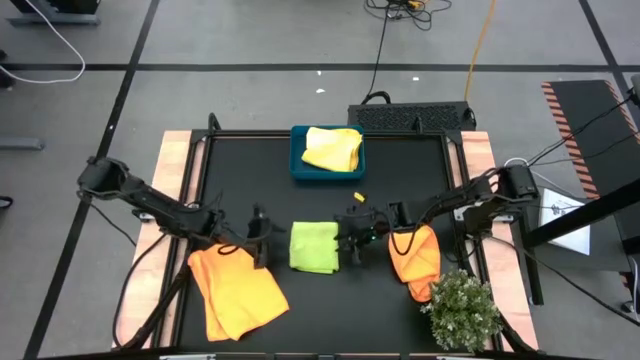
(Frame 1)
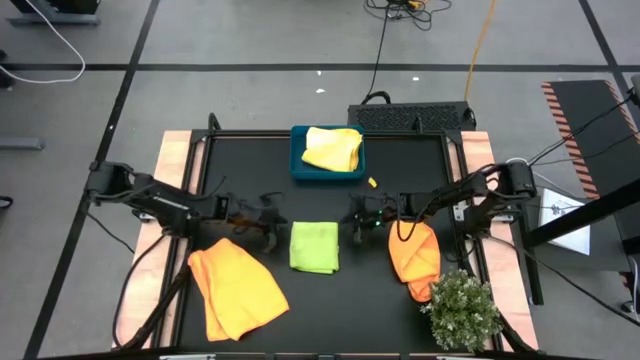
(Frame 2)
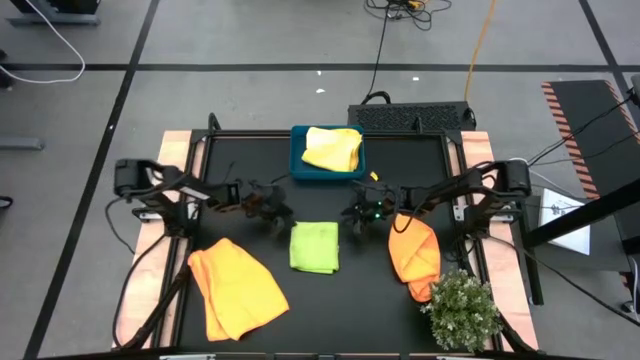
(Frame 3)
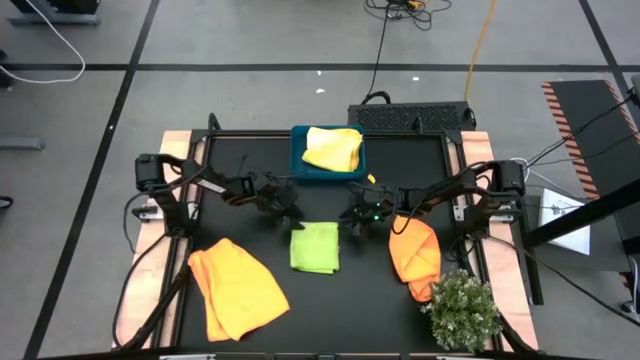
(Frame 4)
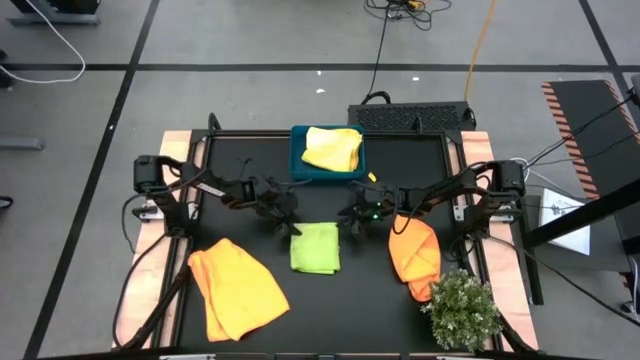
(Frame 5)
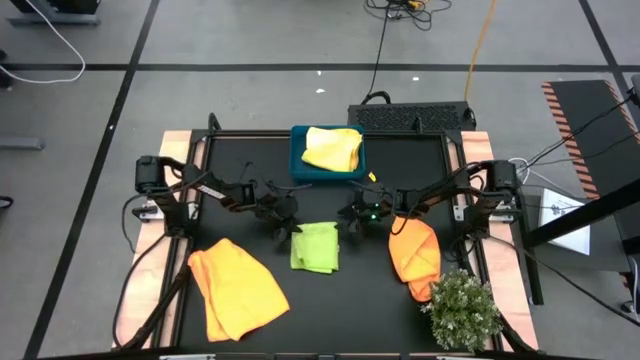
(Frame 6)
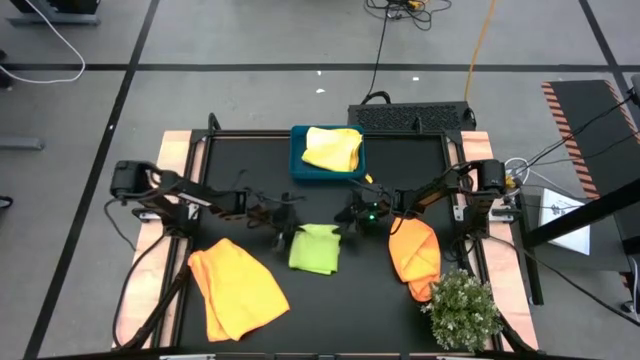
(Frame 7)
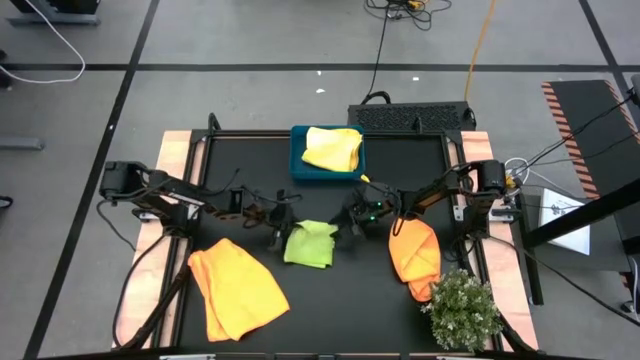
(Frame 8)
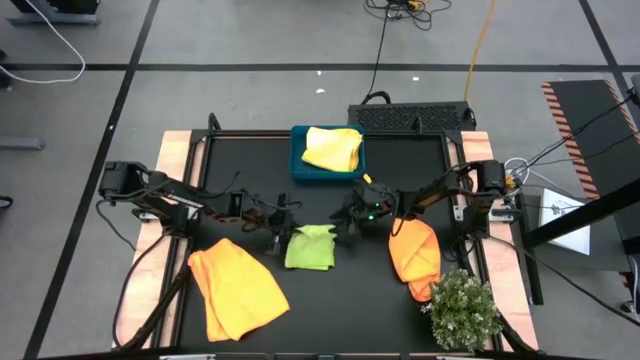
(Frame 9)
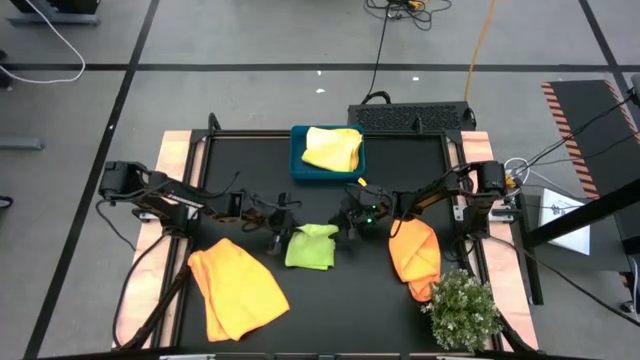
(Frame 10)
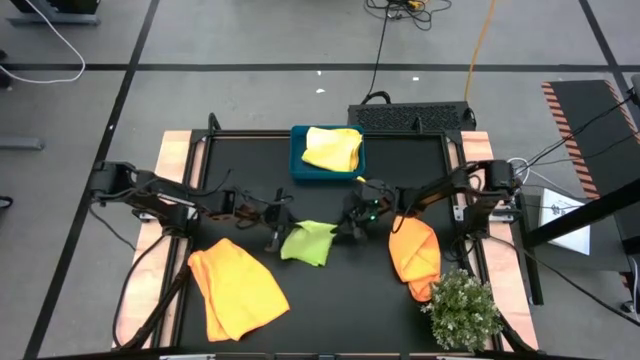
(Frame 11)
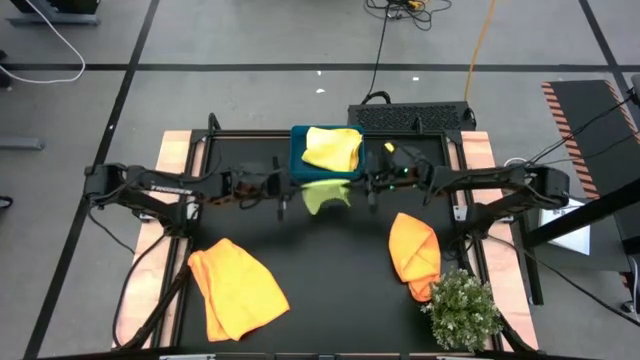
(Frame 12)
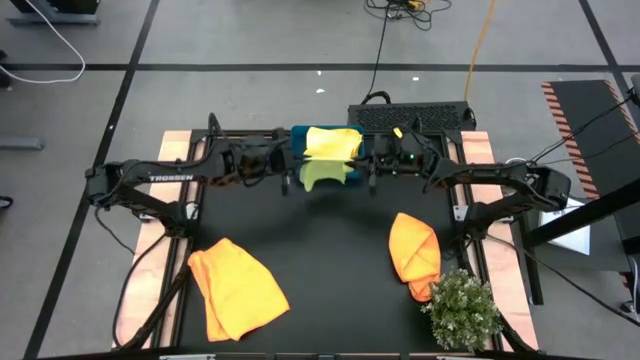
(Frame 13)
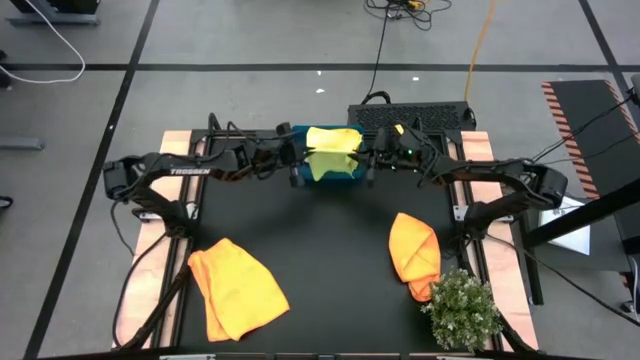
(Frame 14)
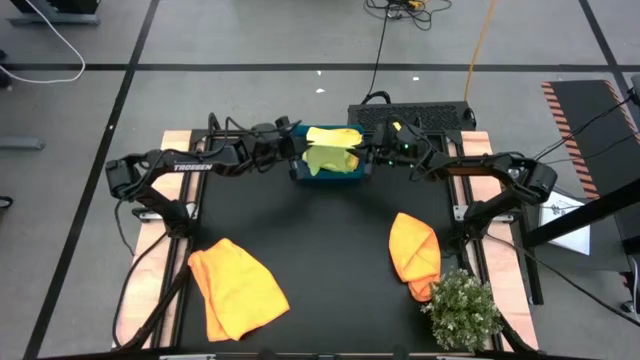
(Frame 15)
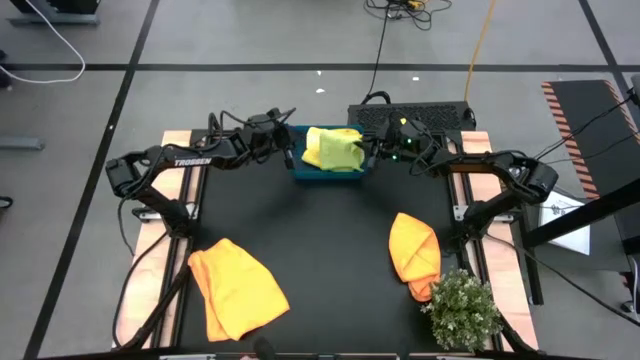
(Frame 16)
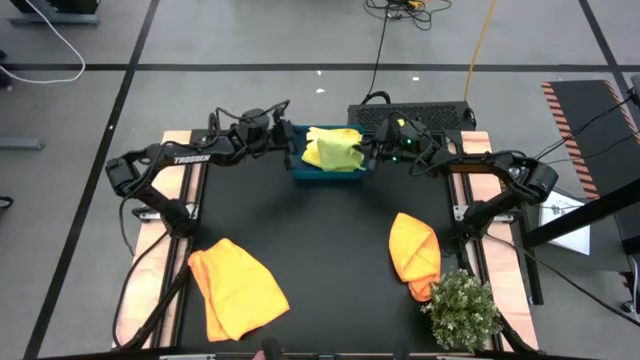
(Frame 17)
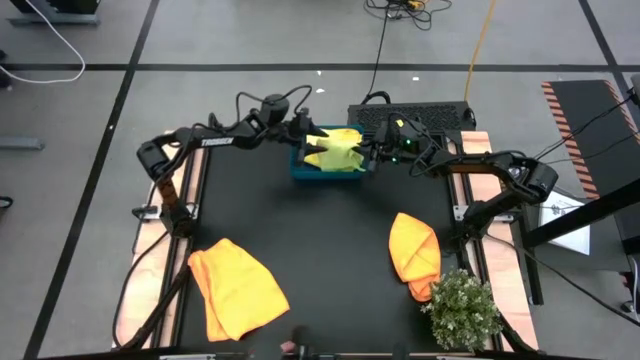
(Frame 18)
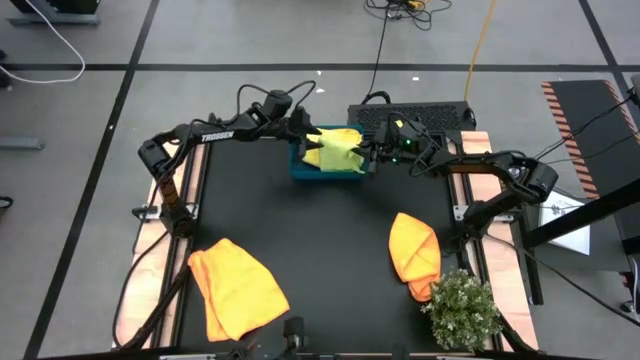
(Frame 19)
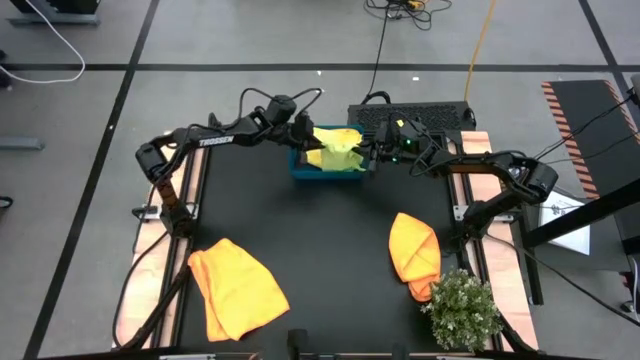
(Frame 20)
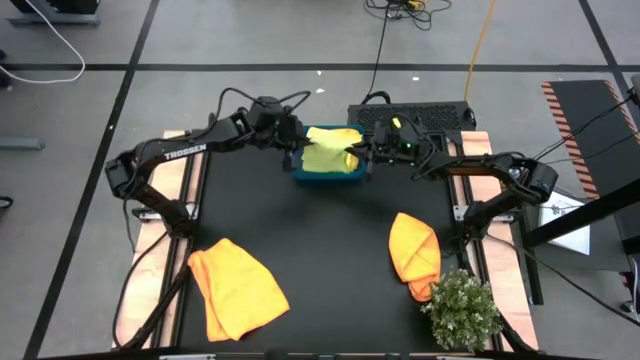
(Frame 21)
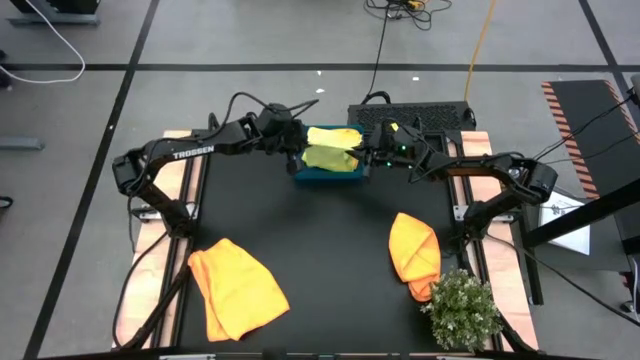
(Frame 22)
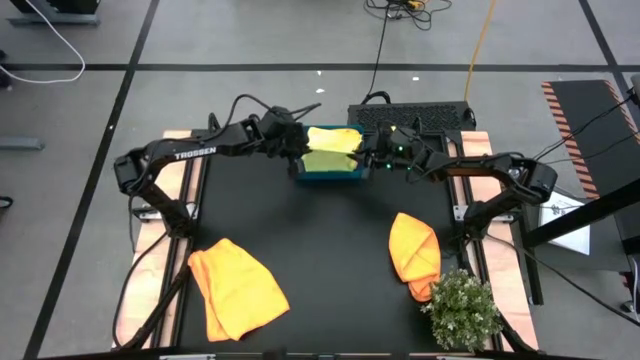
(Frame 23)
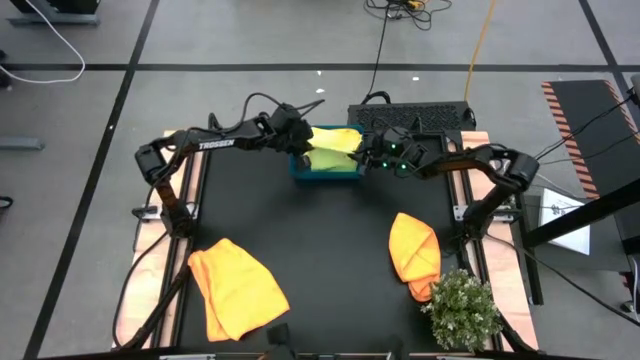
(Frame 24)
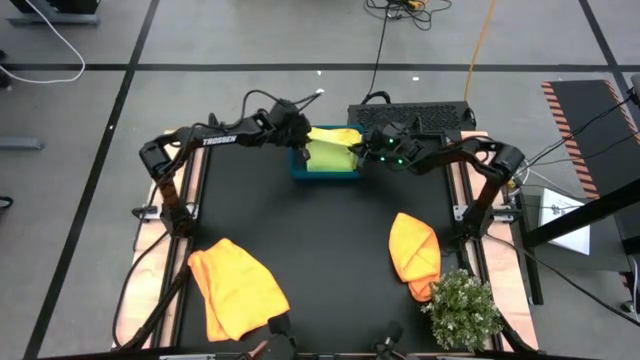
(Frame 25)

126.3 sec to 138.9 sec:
Task: Fold microfiber towels
Put the folded green microfiber towel into the blue bin

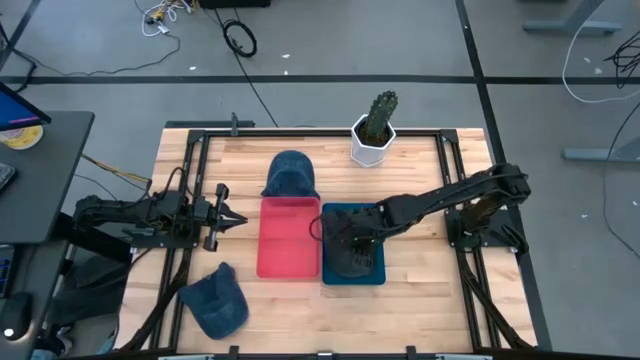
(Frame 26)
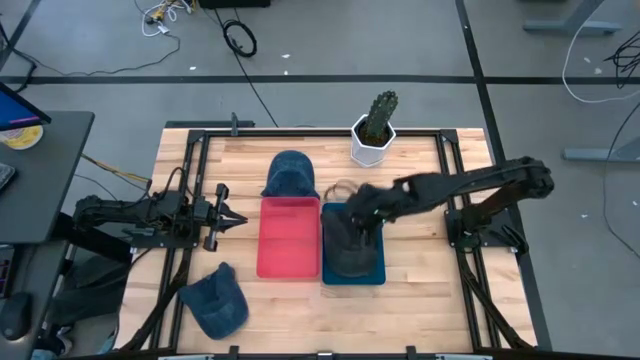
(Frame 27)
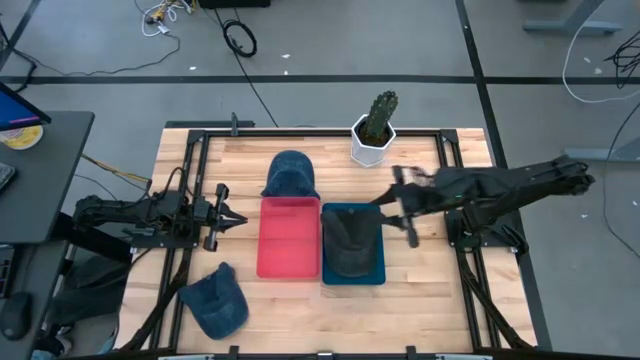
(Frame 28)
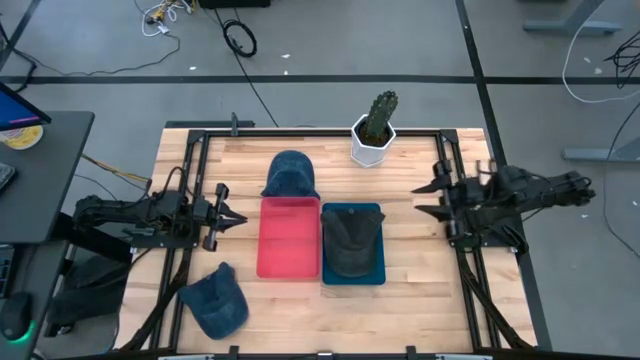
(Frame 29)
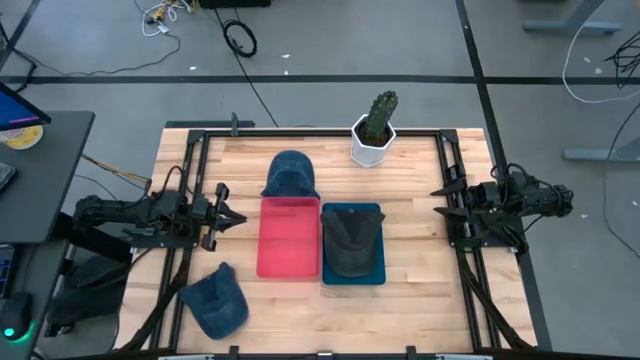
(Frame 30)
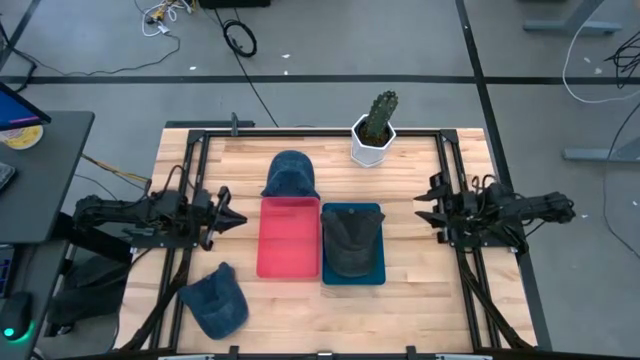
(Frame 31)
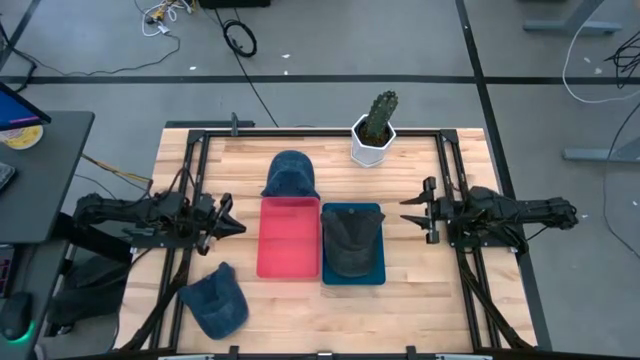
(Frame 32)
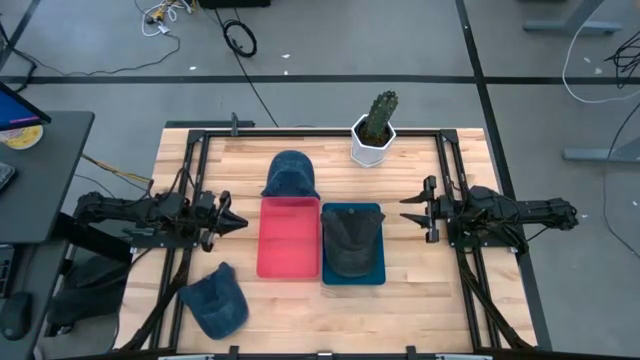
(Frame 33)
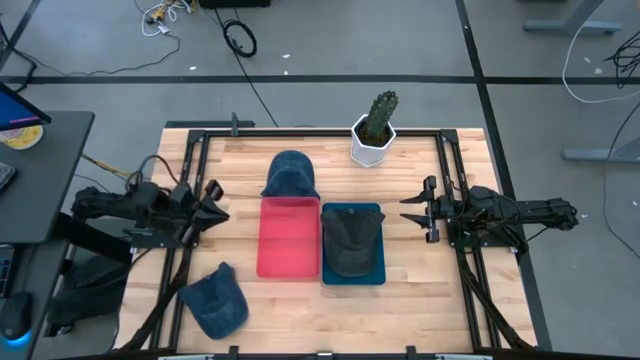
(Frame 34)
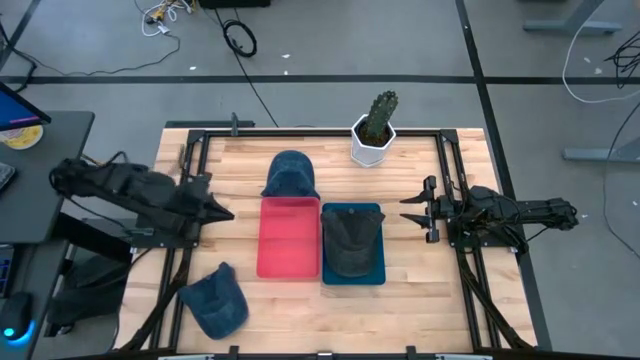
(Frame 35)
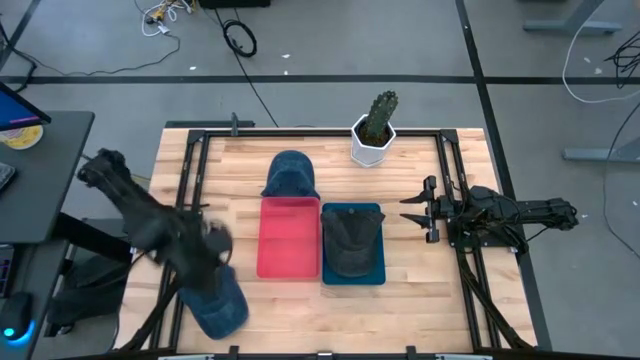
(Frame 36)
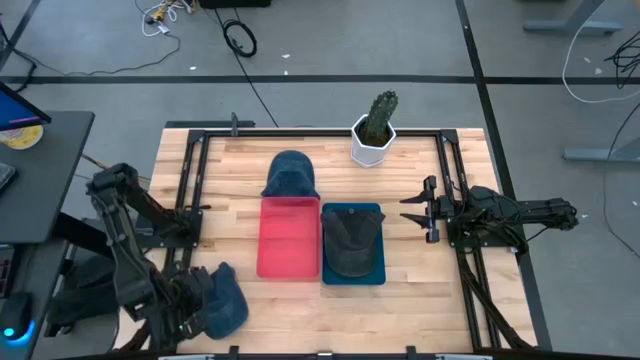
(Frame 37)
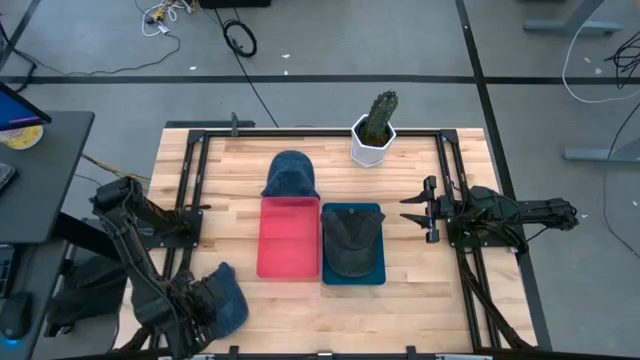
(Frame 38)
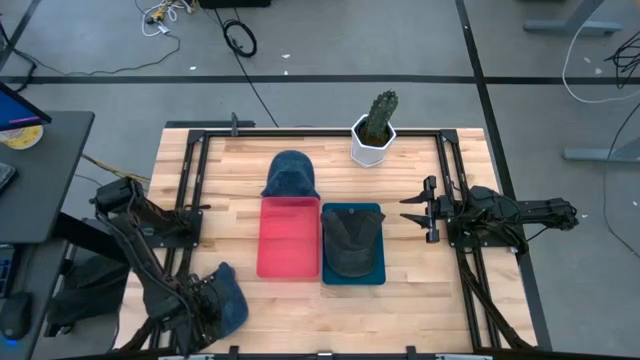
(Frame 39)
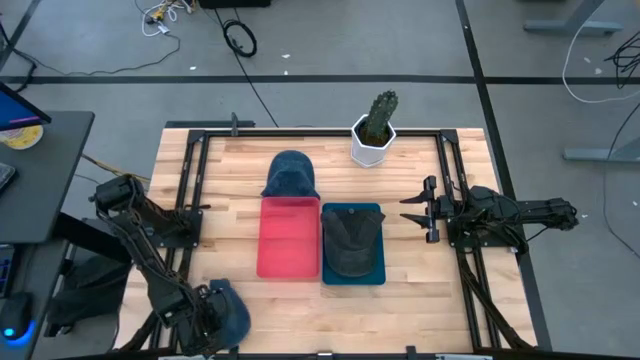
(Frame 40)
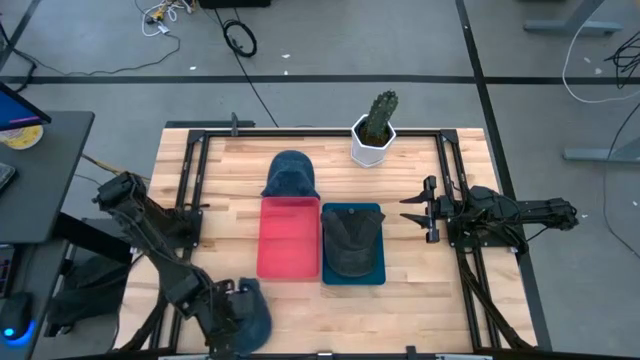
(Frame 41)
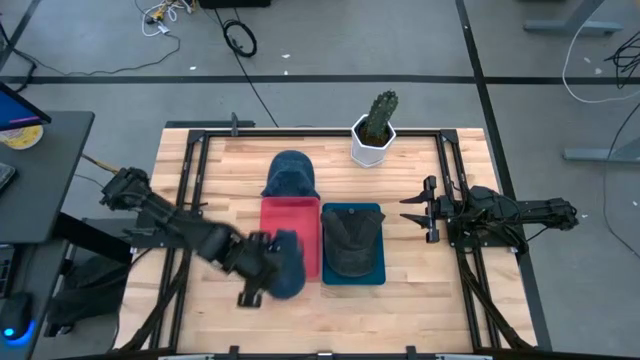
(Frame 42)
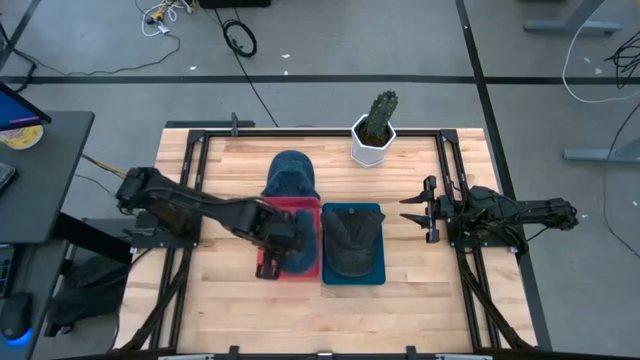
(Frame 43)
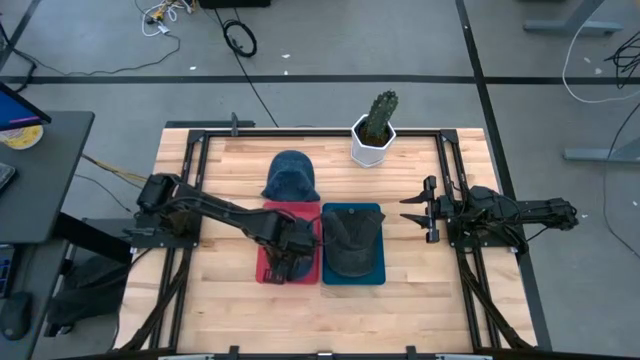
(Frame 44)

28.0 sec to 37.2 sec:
Task: Pick & Place hat
Put the bottom blue cap into the pink bin

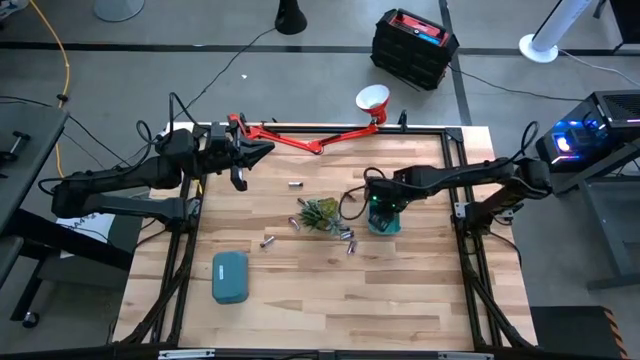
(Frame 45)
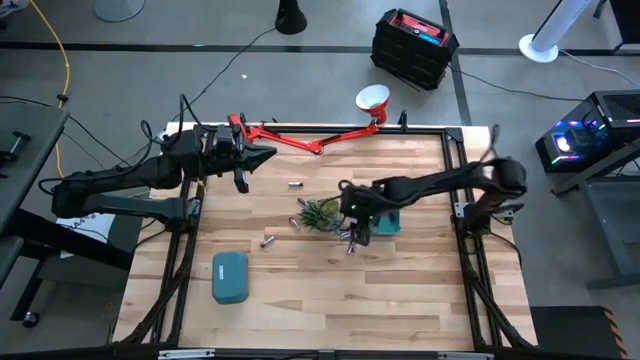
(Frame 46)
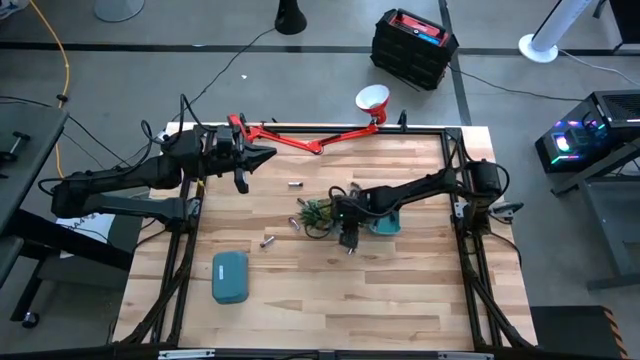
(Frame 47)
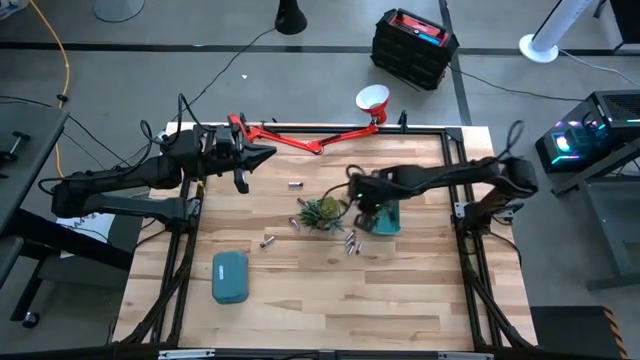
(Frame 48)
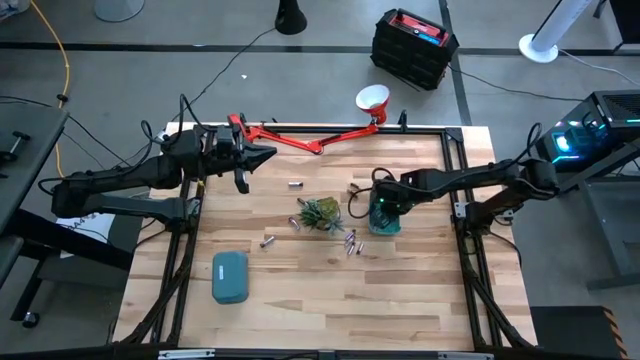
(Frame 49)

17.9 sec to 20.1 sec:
Task: Sort batteries
Put the black battery into the green bin
